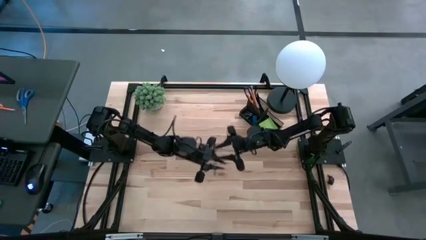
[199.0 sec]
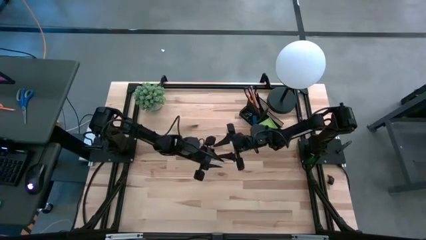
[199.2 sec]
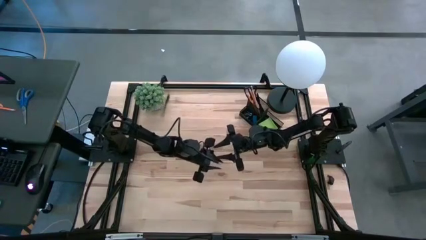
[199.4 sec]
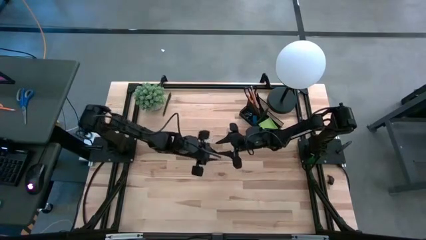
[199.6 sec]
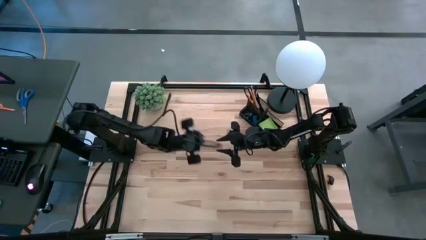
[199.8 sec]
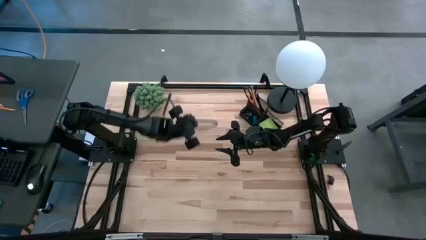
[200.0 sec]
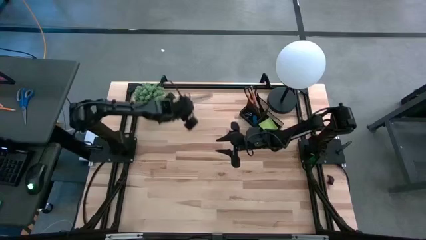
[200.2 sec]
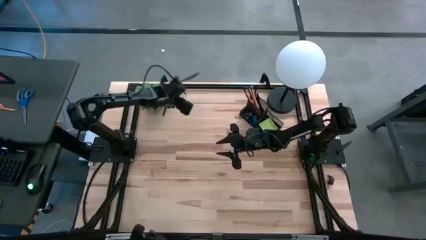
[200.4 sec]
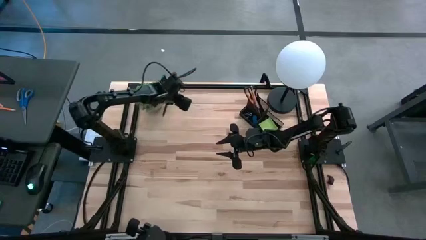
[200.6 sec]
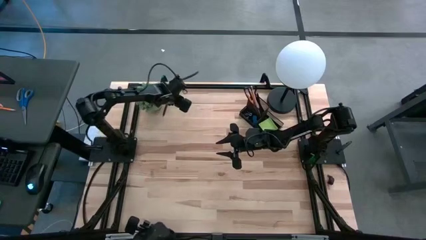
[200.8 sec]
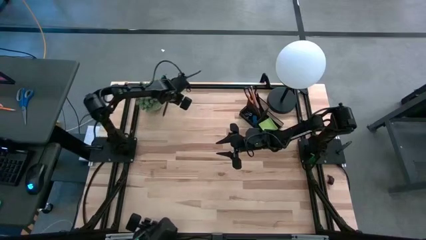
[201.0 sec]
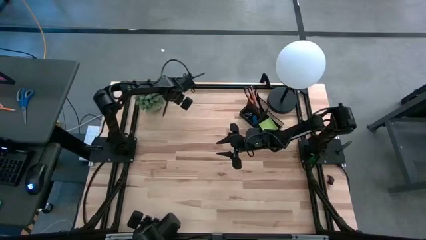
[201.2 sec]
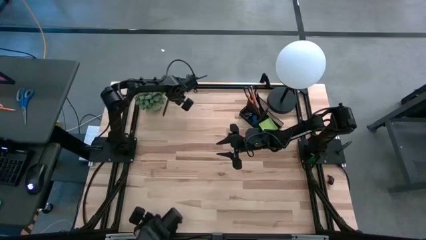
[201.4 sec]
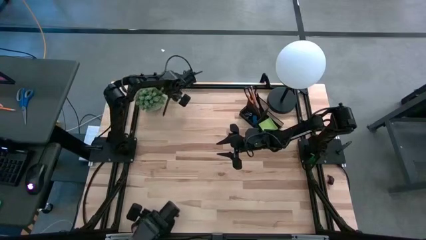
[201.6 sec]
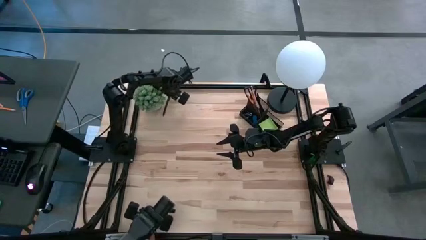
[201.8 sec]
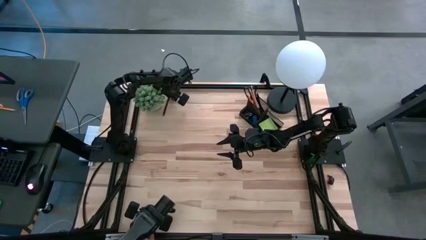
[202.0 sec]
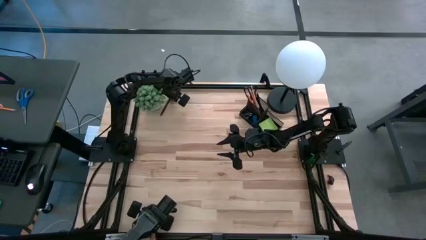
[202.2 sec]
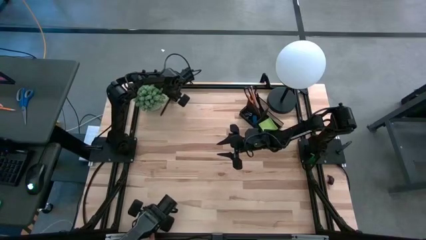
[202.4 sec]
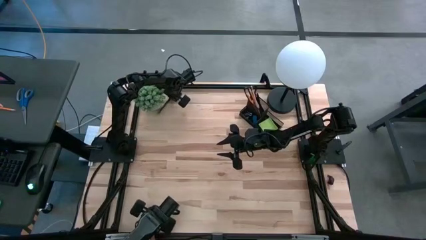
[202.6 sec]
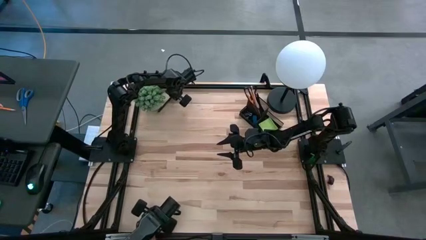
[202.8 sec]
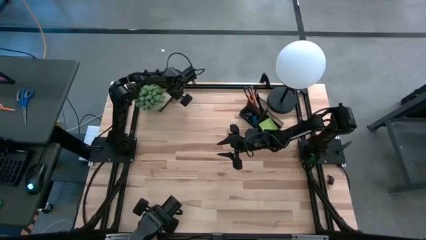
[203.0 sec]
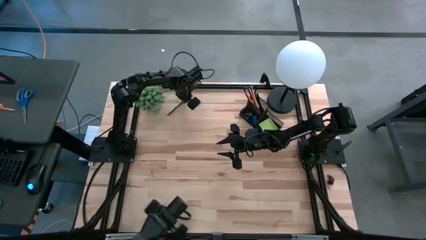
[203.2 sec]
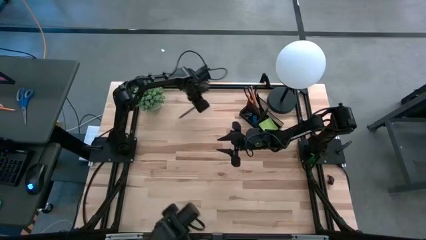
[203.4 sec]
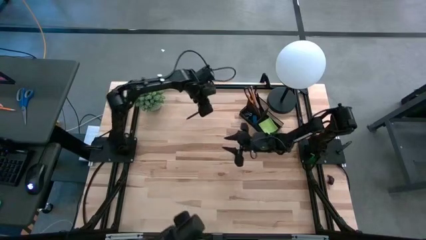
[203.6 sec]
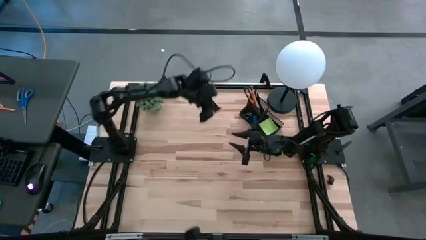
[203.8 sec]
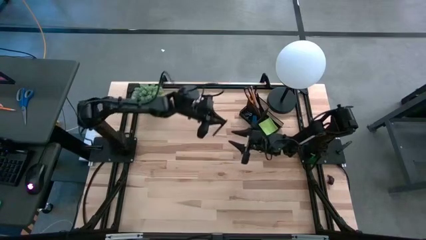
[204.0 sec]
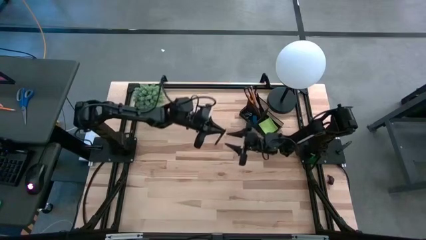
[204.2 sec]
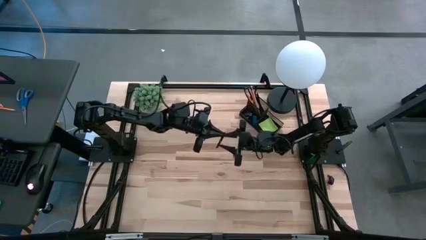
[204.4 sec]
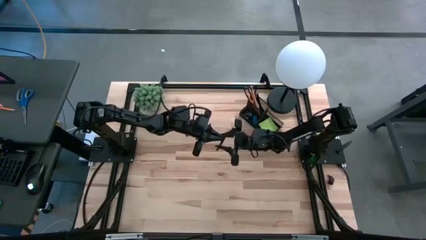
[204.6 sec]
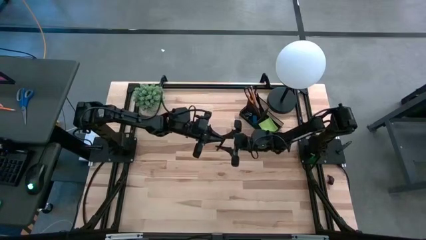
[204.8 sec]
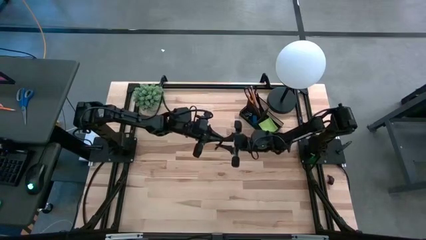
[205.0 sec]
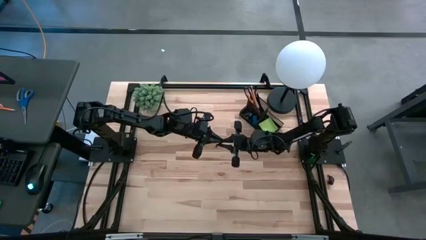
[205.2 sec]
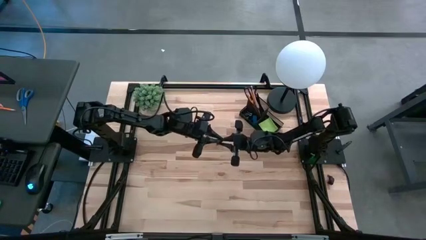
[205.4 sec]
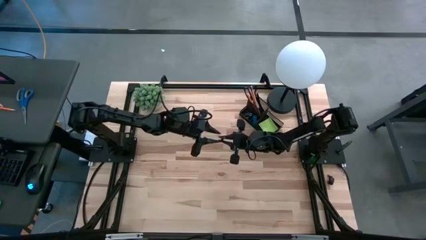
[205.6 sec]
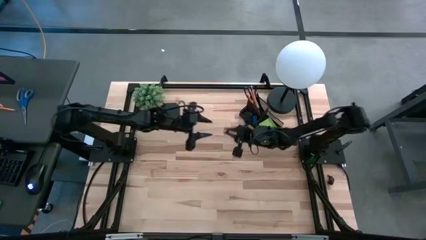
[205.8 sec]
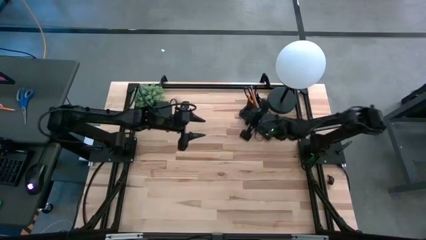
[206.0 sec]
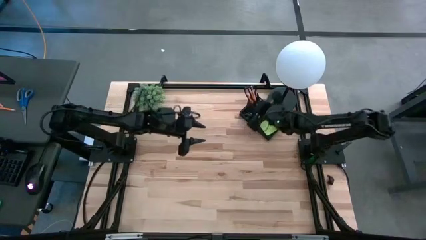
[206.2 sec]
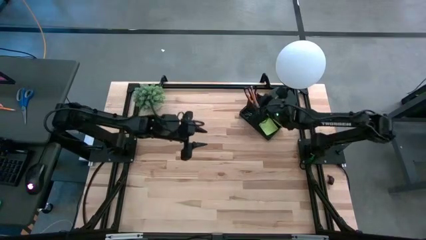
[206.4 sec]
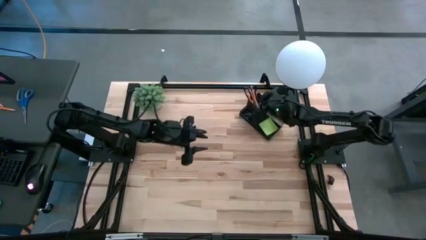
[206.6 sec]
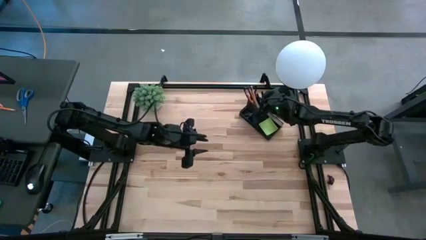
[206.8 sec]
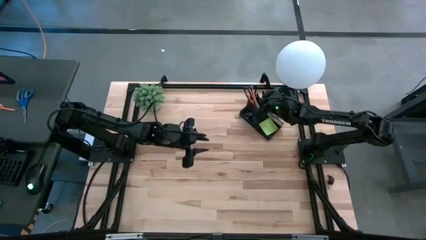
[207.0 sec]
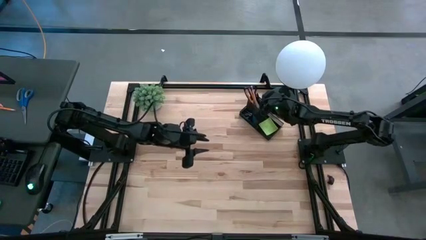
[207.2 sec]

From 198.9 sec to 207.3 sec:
Task: Pick and place office supplies into organizer
Put the black pen into the black desk organizer

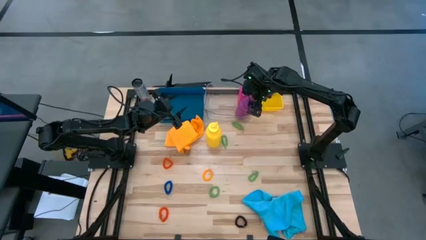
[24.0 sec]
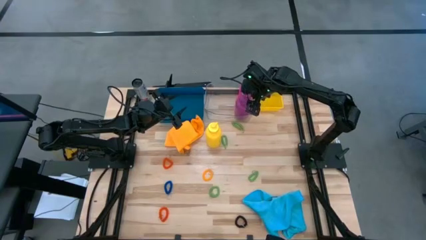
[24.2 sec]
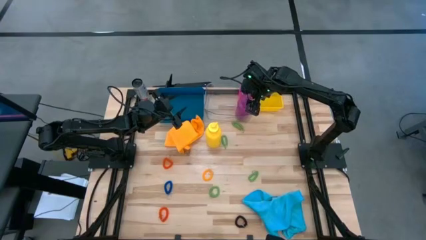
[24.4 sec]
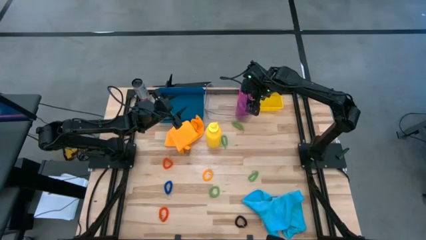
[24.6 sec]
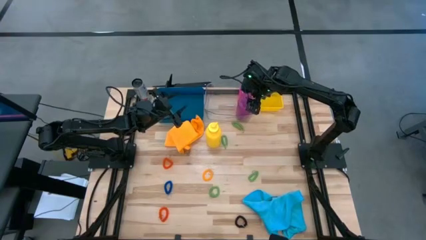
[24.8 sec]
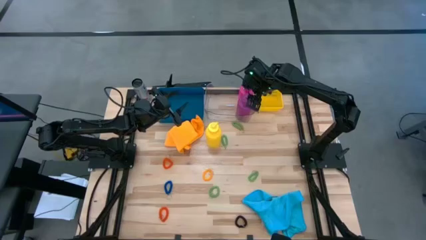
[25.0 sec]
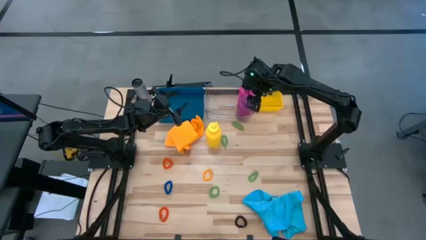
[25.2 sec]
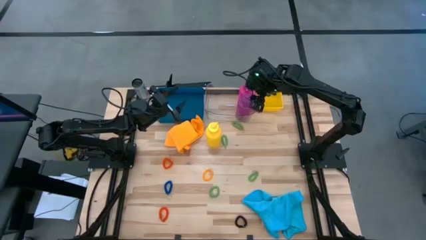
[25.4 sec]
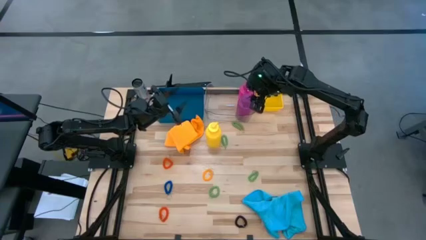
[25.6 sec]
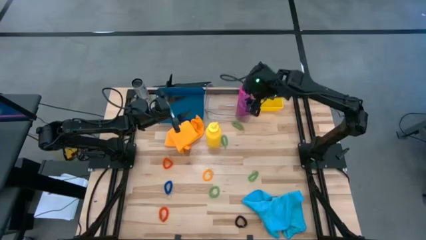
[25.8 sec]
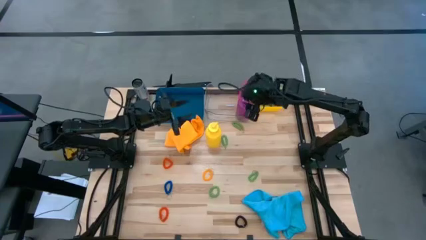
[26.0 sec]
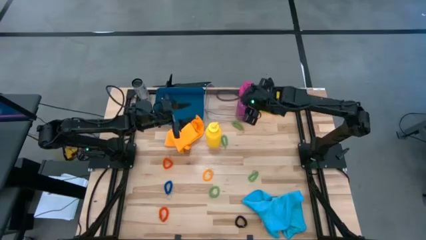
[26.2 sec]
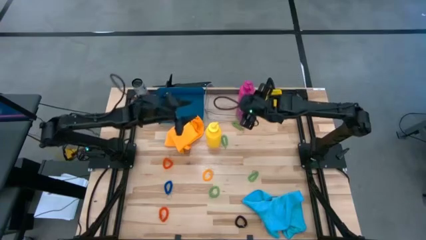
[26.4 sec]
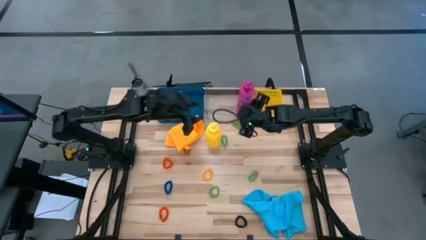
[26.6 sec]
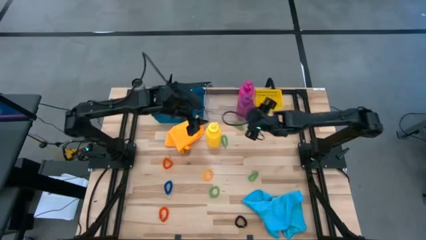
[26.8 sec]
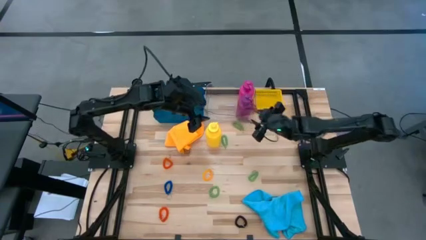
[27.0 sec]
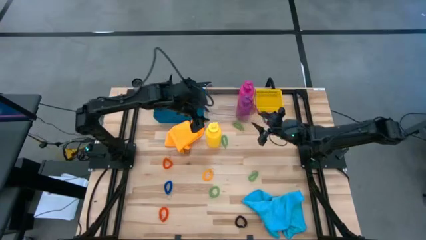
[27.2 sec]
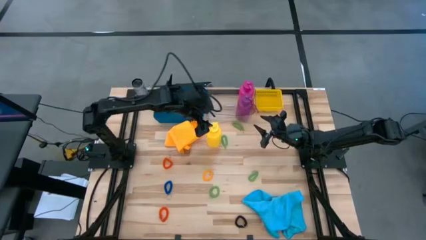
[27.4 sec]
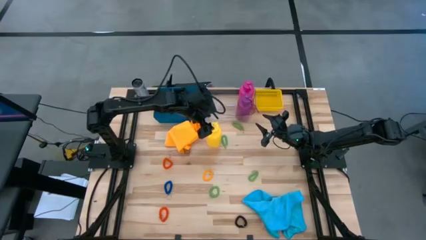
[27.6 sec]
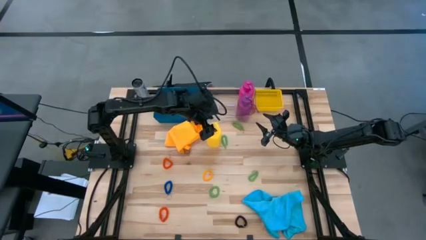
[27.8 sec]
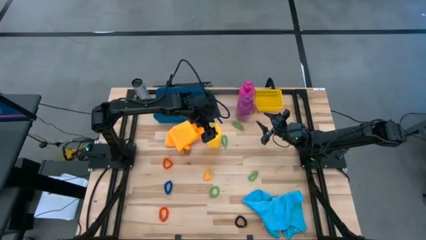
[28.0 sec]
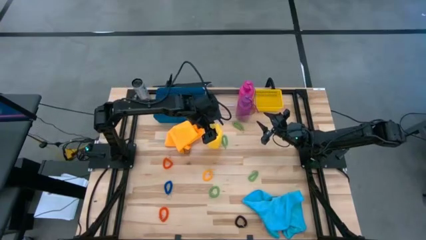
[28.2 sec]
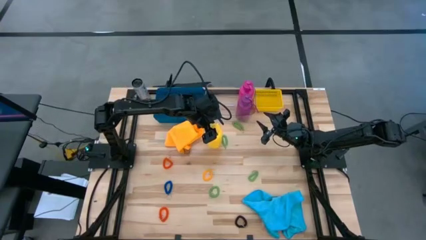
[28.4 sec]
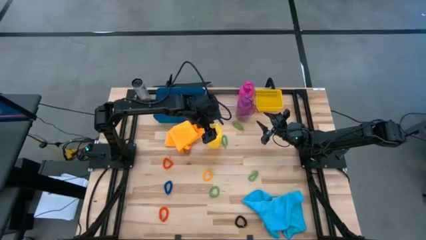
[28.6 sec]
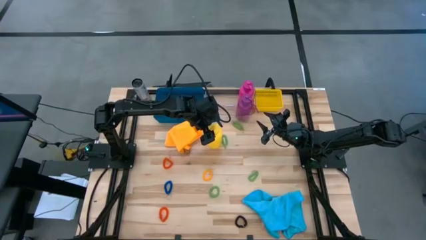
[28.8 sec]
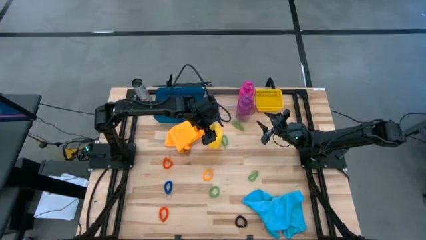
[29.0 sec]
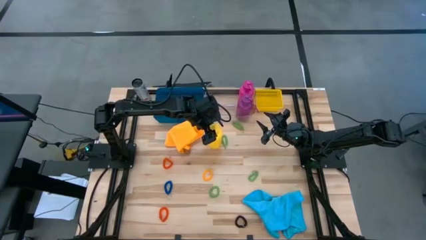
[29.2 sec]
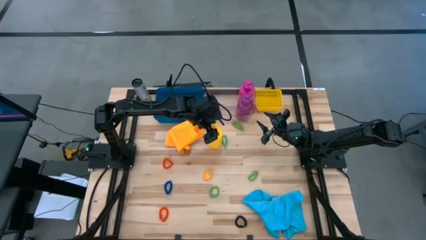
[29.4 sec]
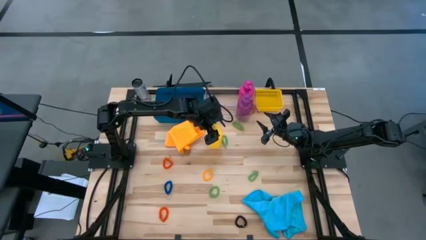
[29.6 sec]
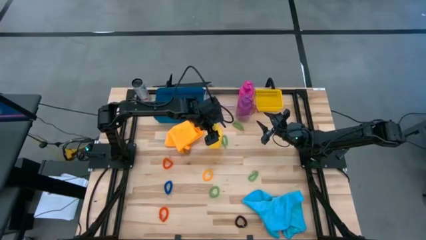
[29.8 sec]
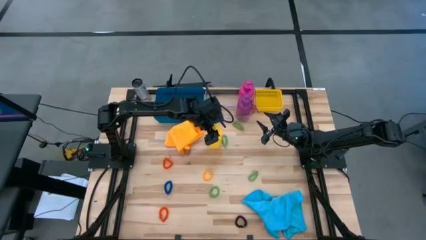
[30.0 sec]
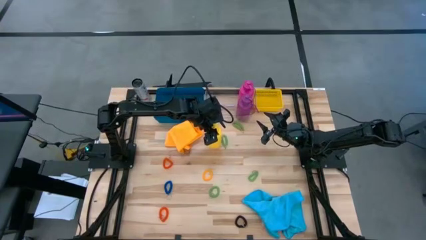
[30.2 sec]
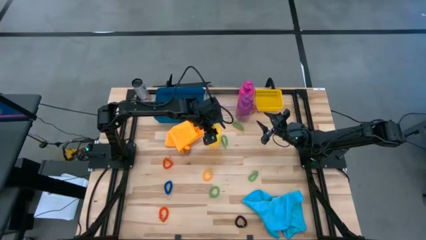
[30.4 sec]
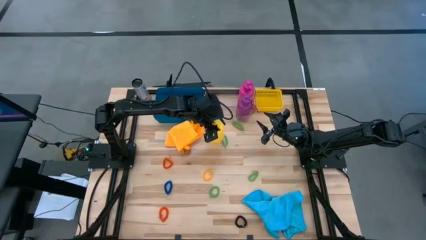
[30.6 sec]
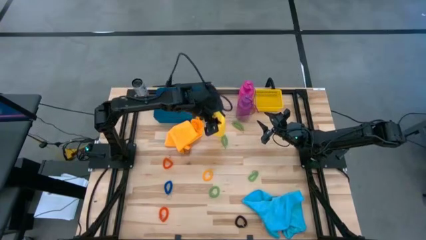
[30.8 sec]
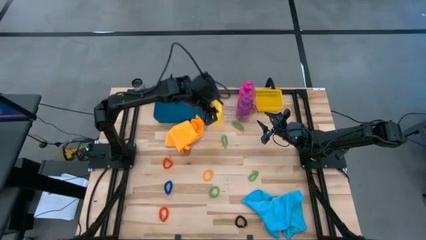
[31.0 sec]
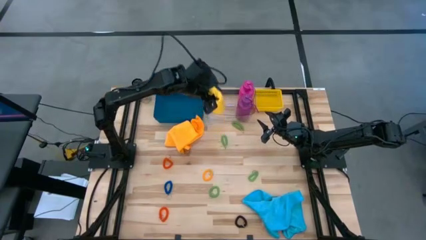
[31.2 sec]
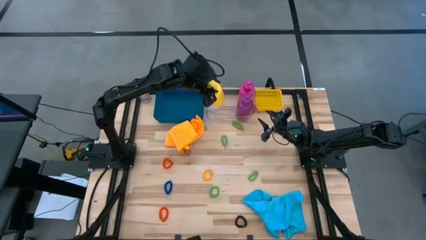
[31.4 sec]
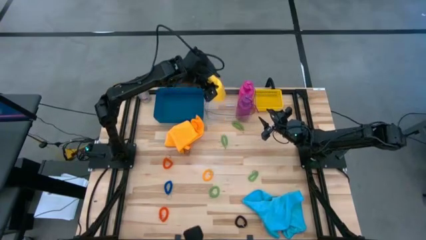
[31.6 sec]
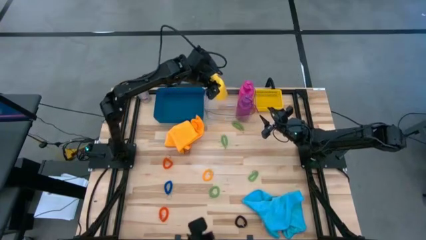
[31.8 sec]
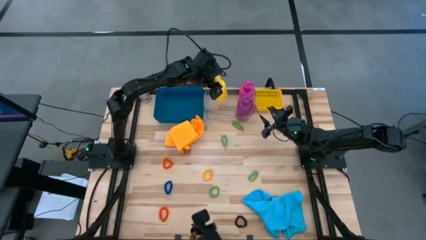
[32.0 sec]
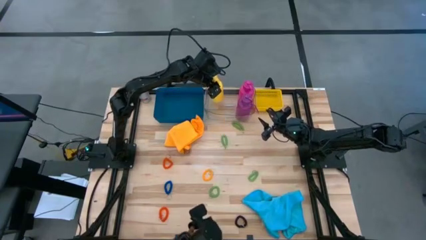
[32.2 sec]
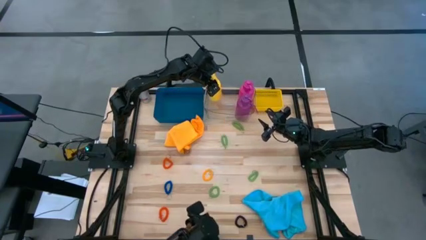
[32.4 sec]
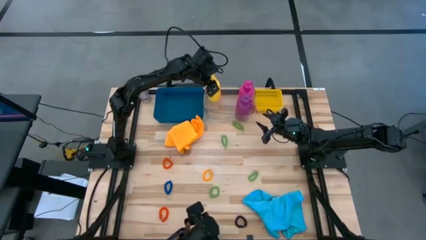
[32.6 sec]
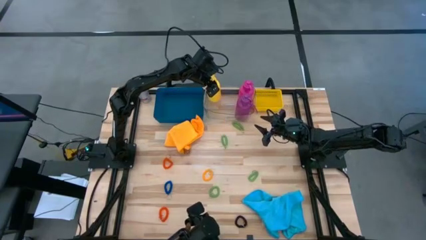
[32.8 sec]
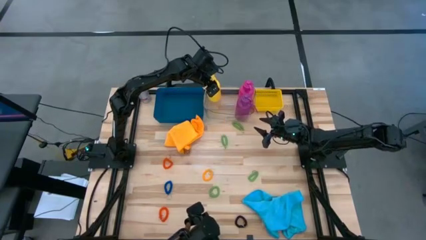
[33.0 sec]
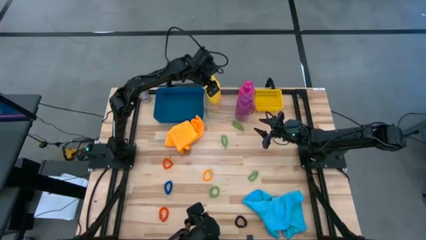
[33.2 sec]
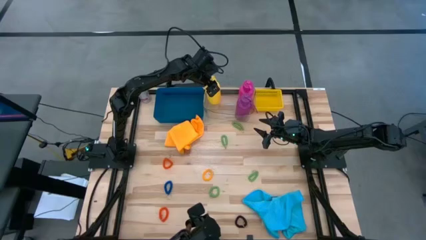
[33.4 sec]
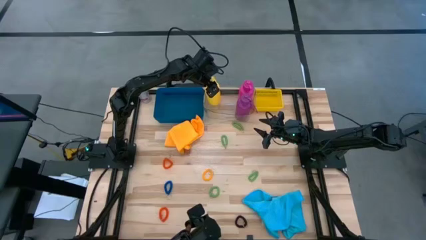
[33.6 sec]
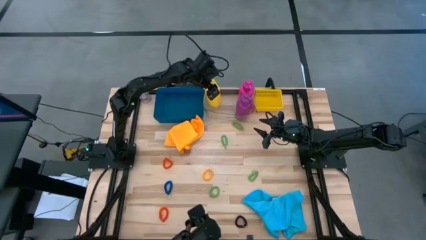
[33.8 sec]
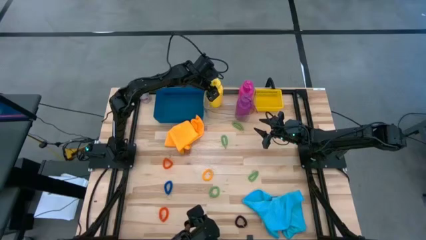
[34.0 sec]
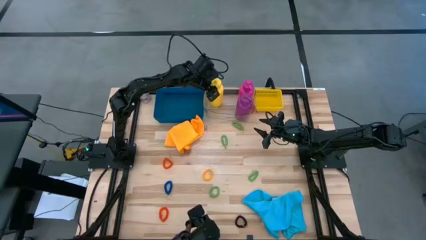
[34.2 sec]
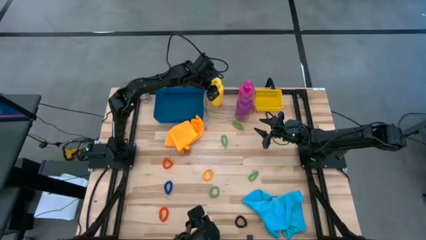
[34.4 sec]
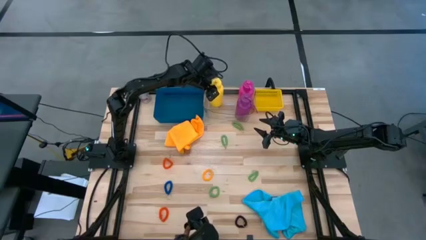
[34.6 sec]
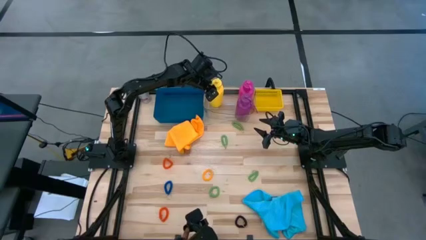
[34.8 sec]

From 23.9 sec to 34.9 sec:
Task: Pick & Place Sports Items
Put the yellow tumbler into the transparent bin
